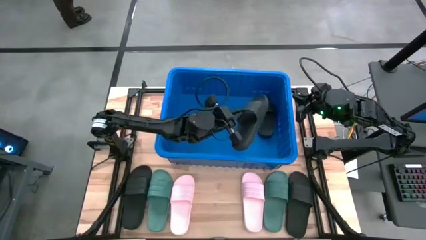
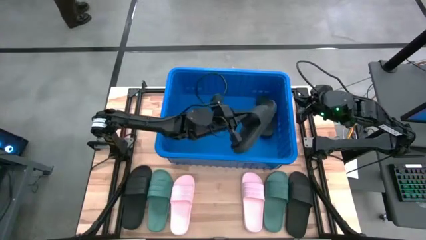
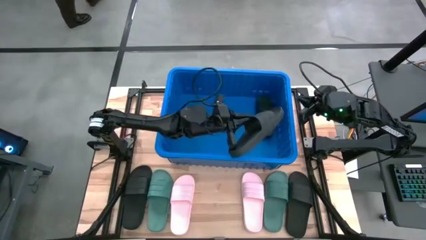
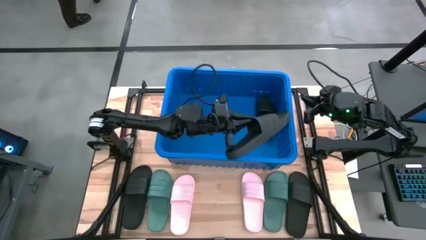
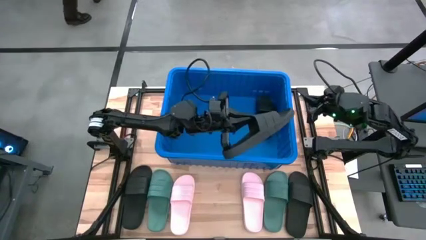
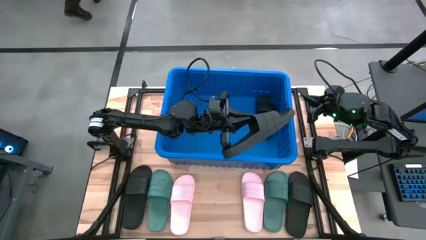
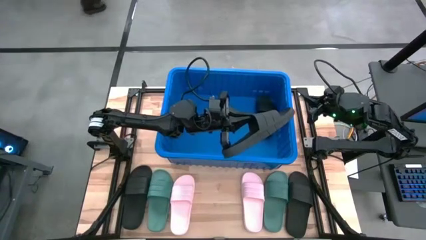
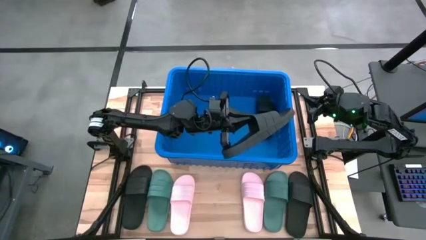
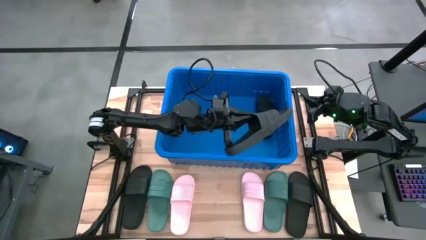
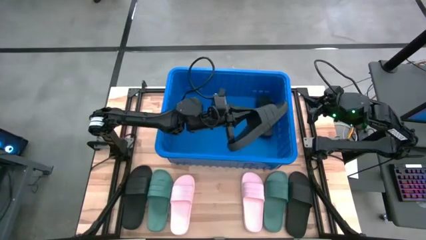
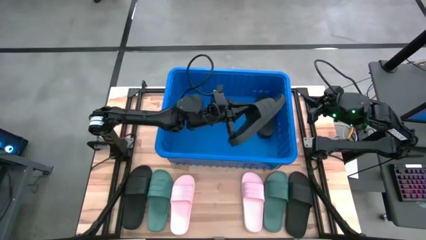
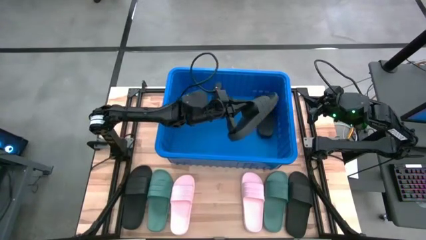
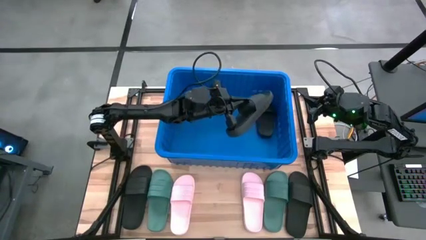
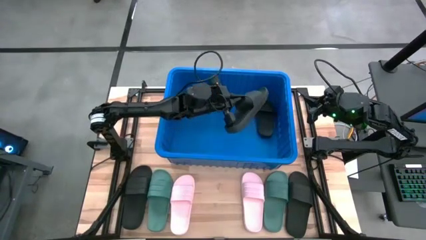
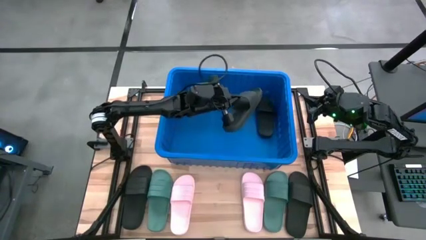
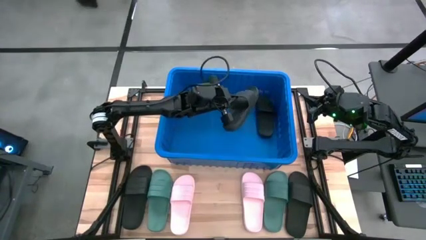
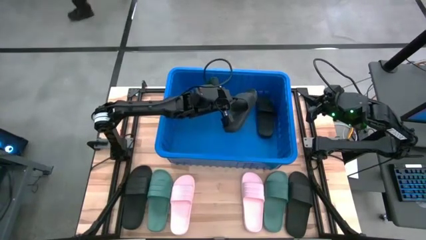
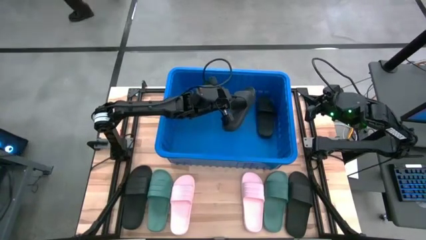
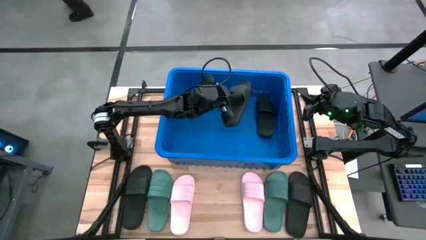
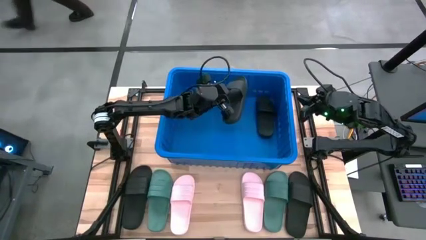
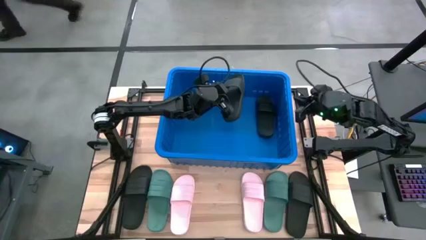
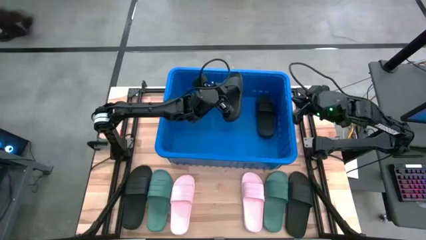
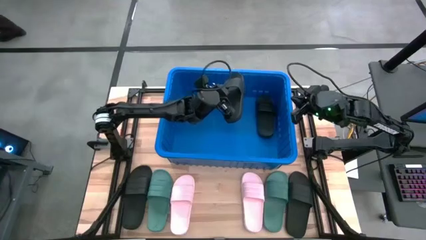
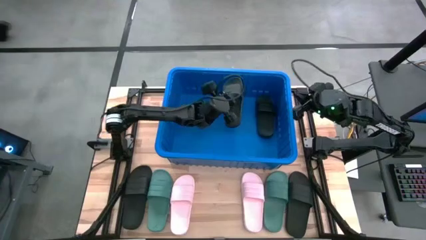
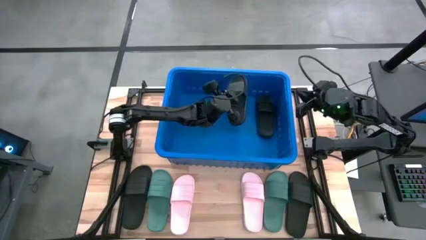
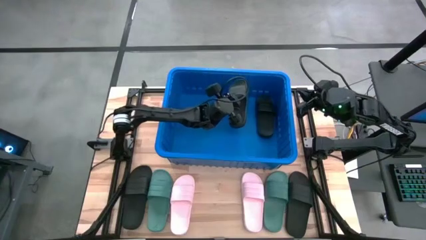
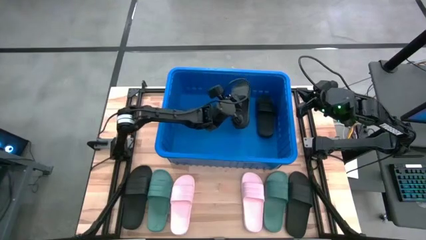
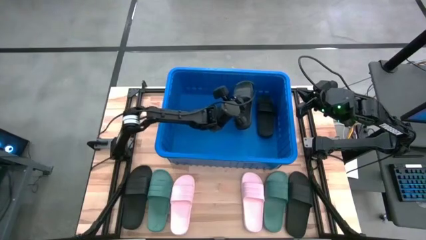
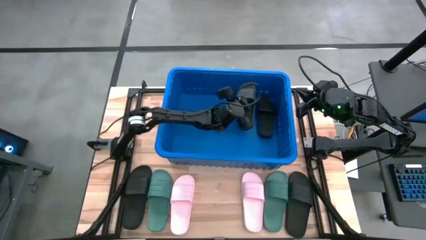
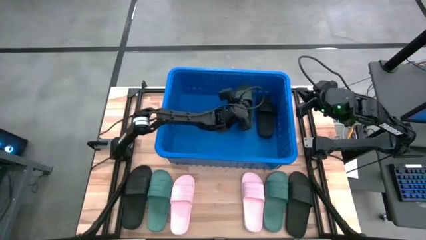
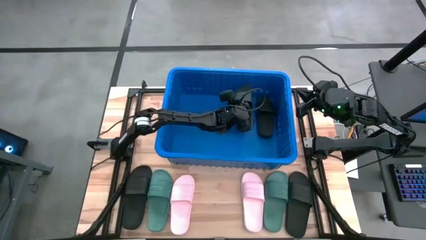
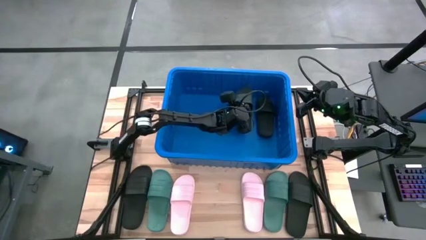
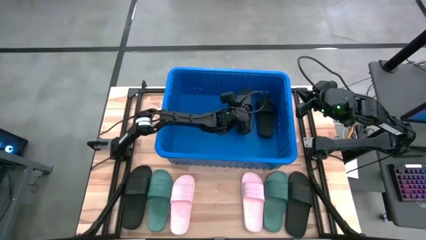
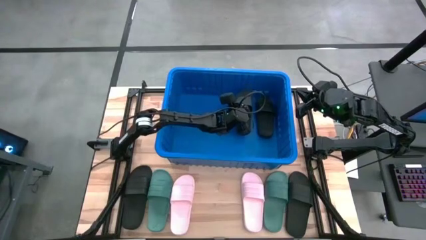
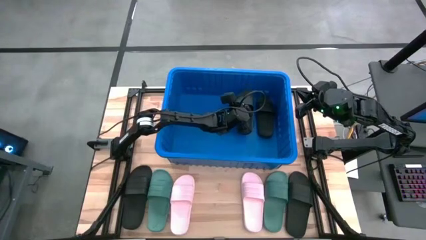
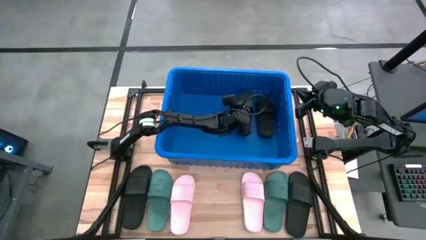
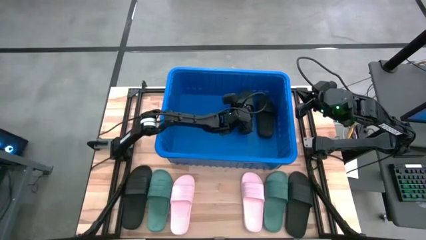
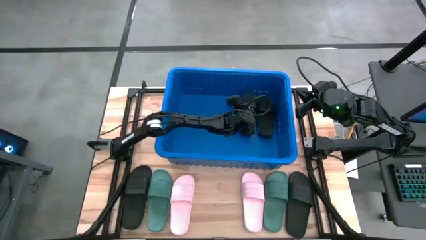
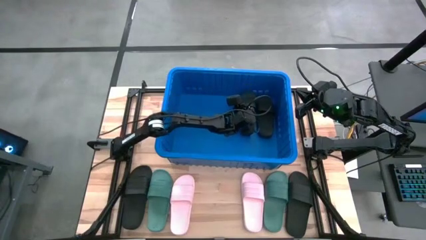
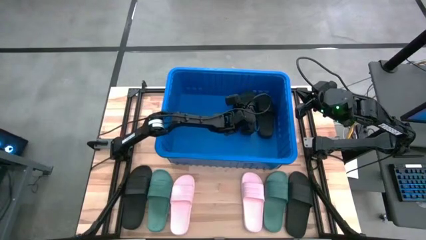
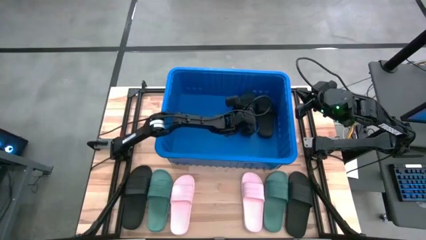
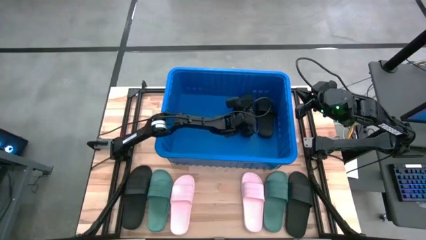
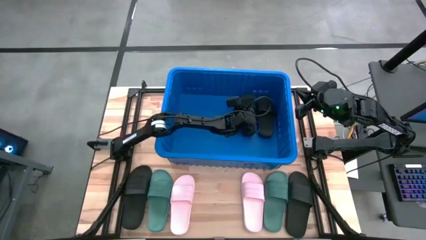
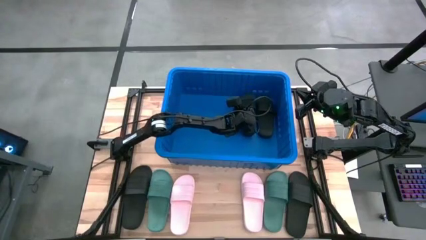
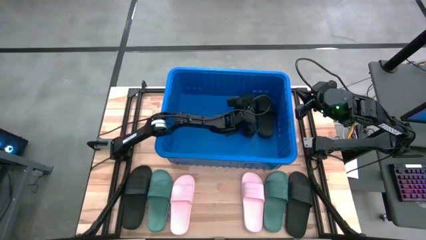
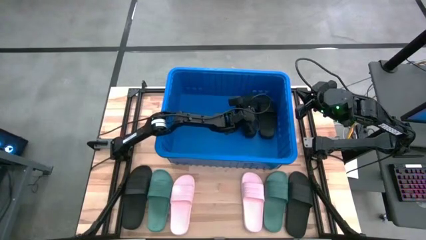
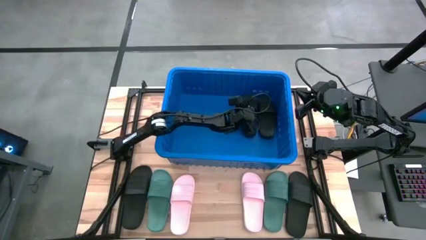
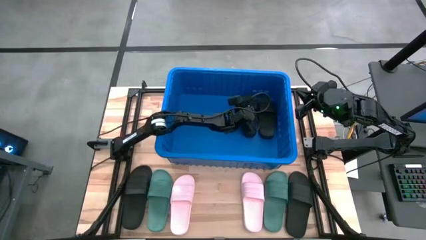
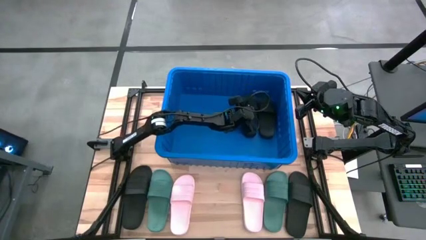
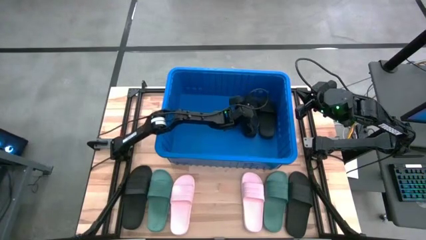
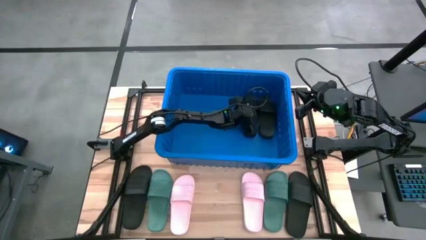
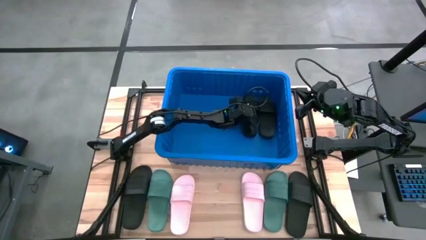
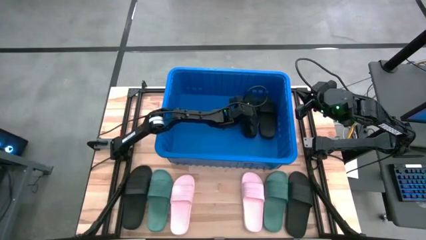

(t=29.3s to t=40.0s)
Task: Pick and place slides into bin
Put the middle black slide into the blue bin
